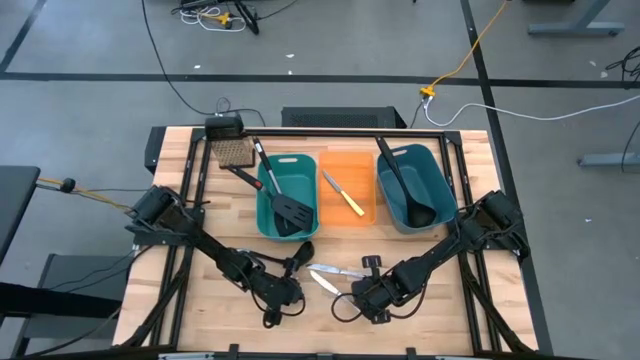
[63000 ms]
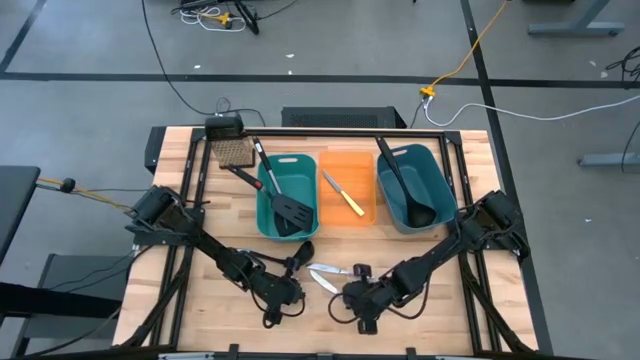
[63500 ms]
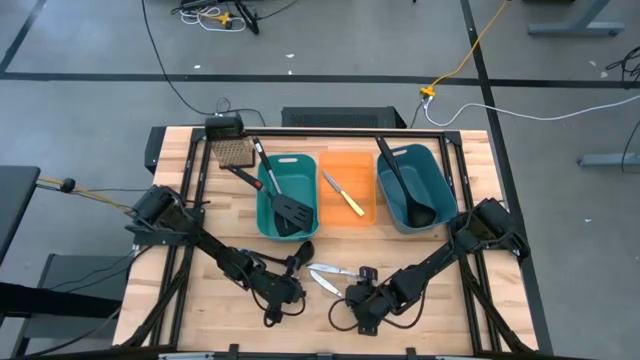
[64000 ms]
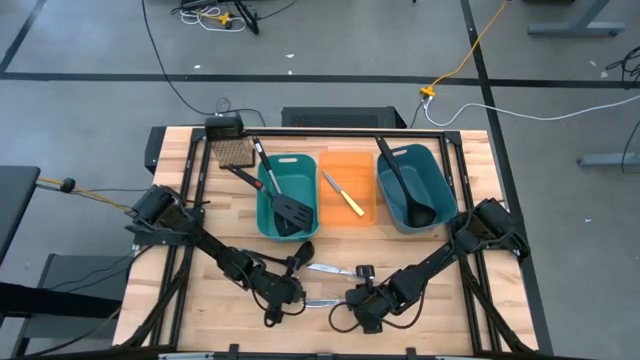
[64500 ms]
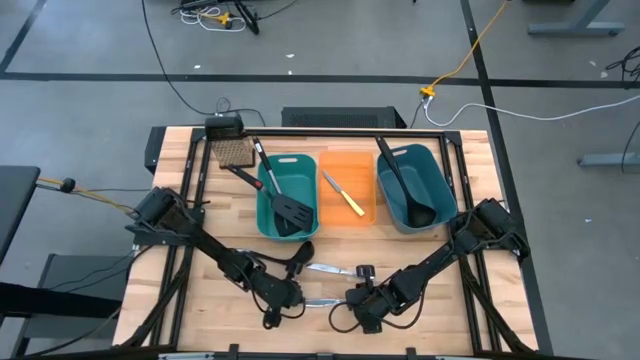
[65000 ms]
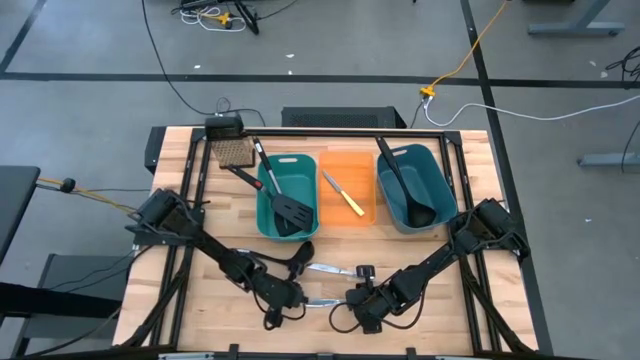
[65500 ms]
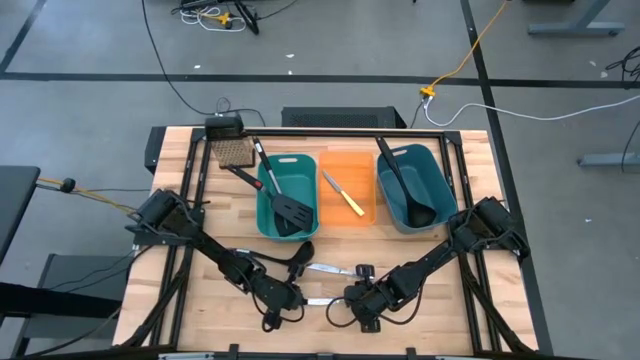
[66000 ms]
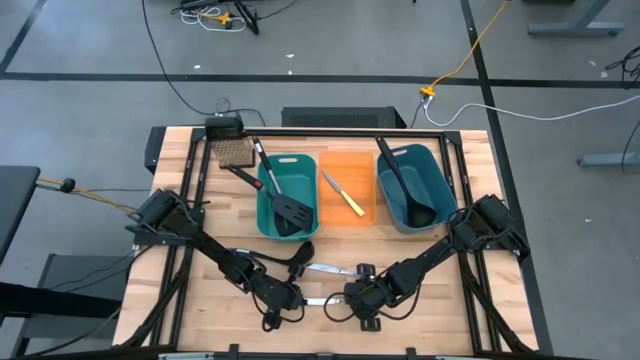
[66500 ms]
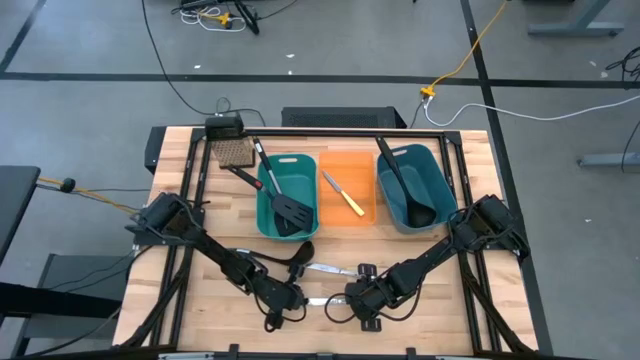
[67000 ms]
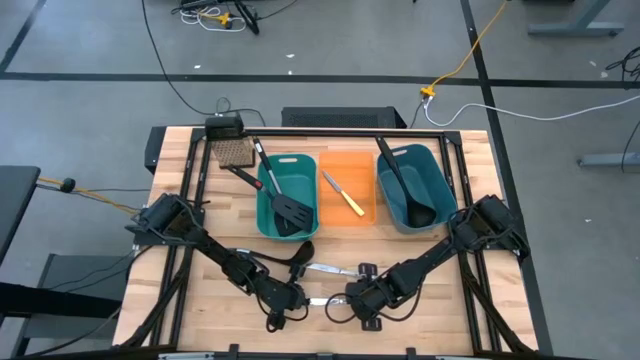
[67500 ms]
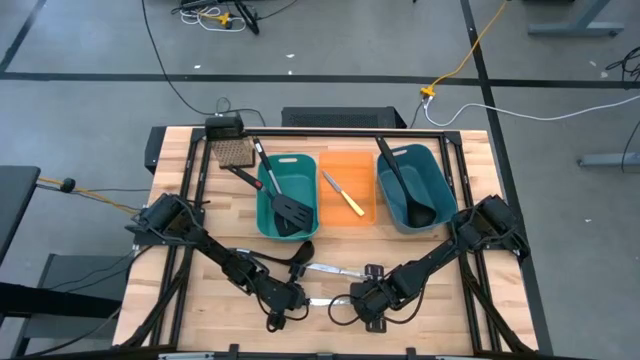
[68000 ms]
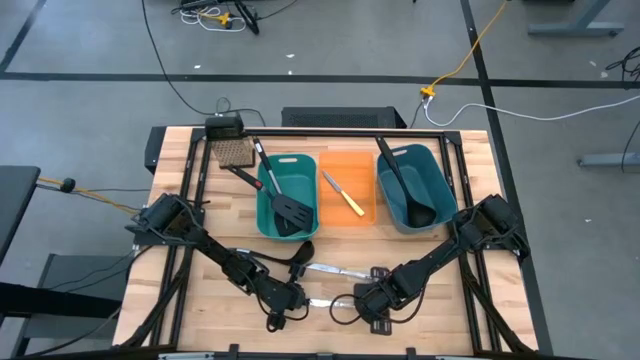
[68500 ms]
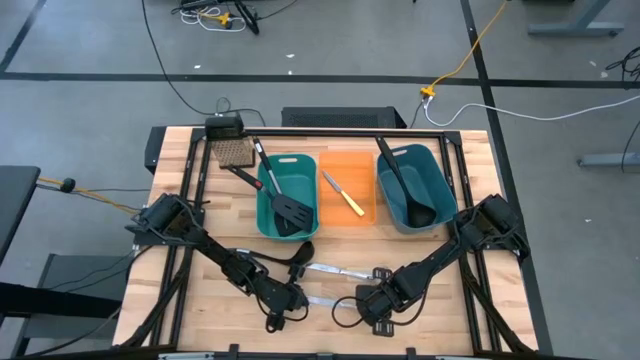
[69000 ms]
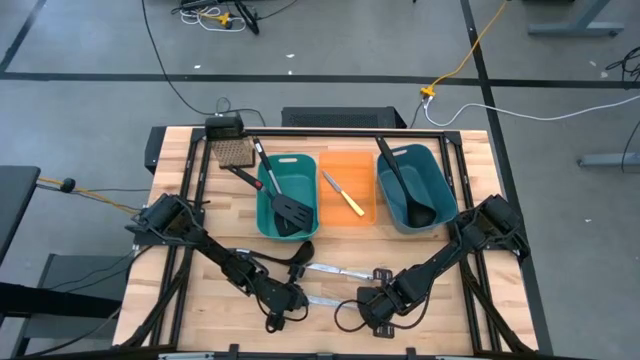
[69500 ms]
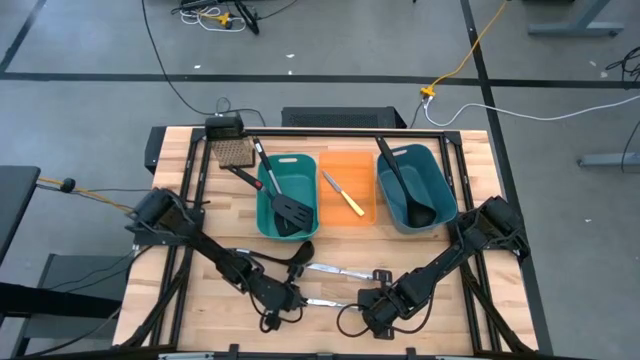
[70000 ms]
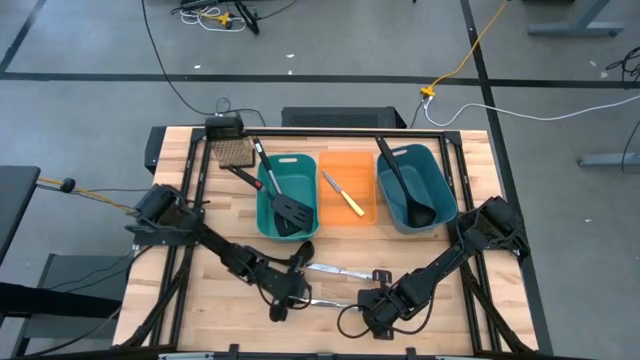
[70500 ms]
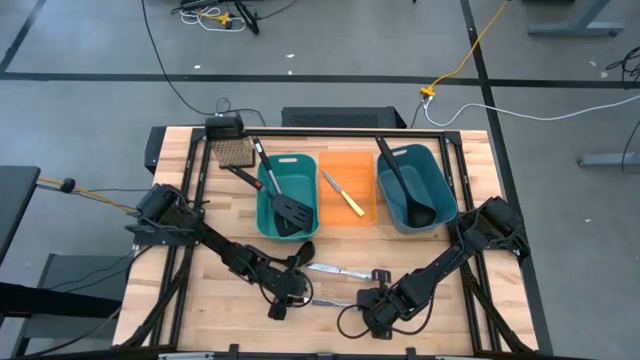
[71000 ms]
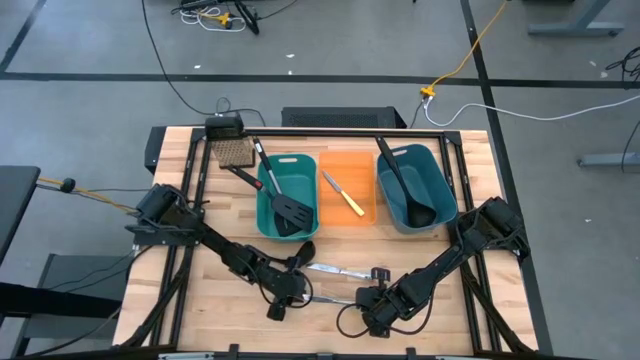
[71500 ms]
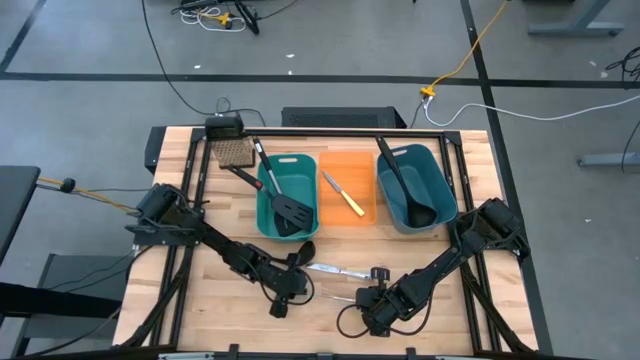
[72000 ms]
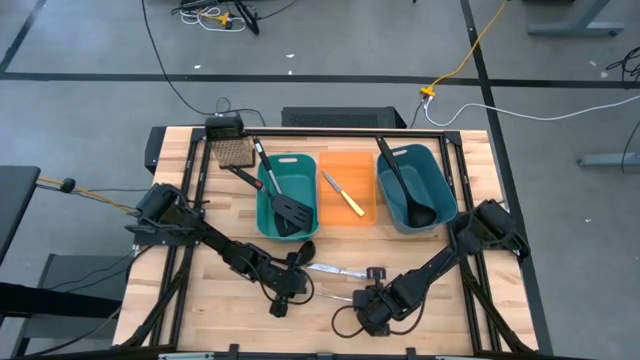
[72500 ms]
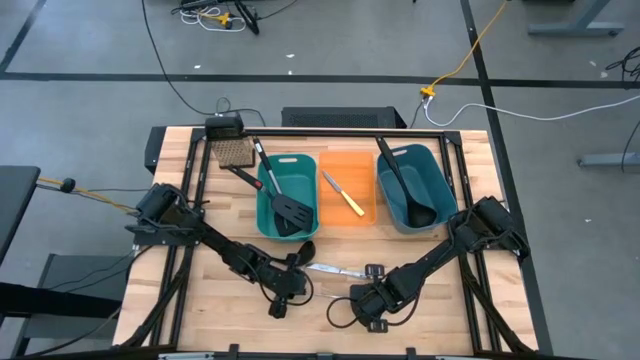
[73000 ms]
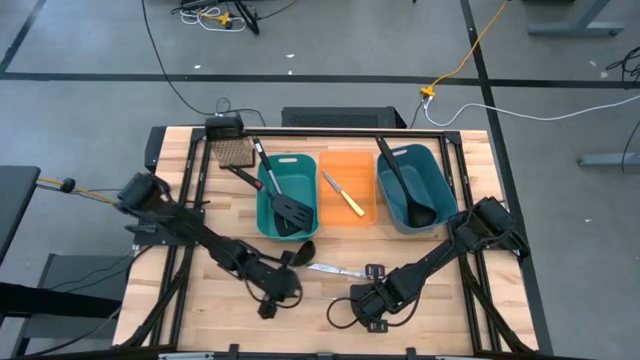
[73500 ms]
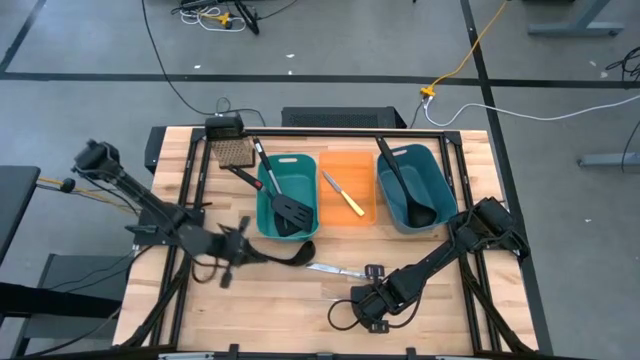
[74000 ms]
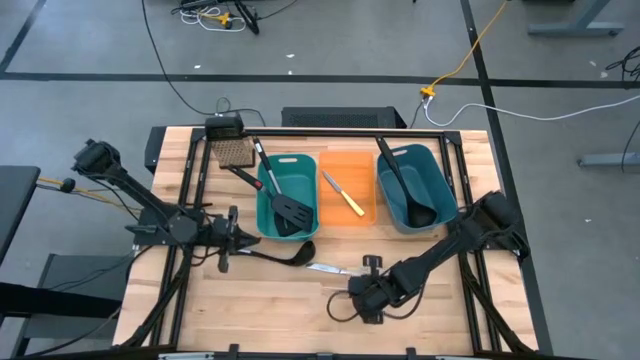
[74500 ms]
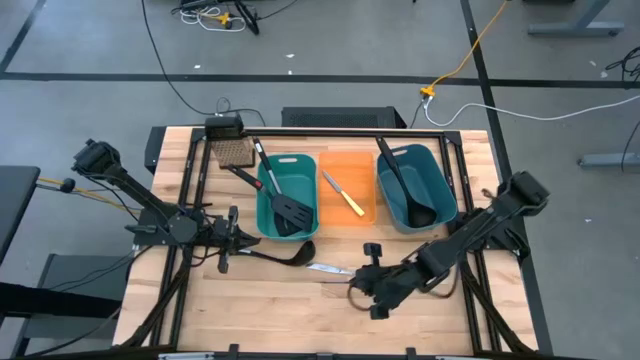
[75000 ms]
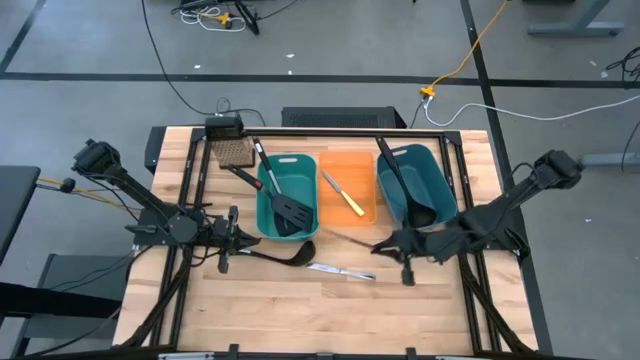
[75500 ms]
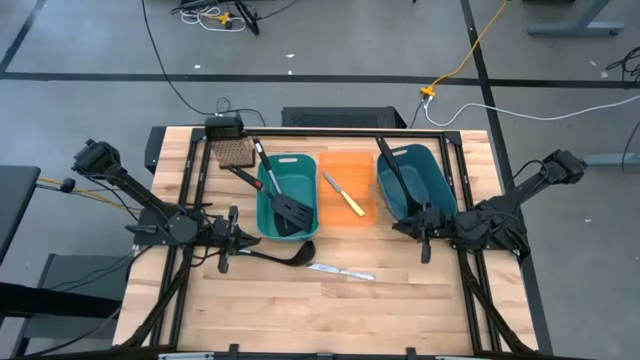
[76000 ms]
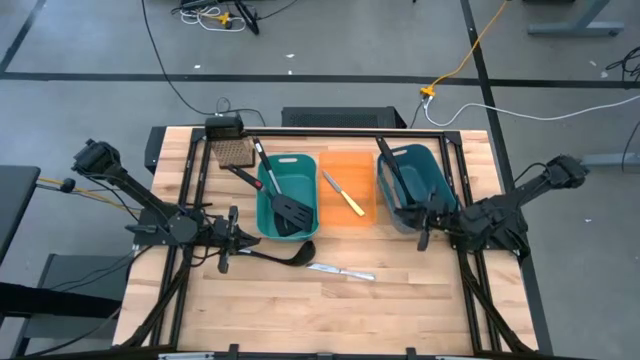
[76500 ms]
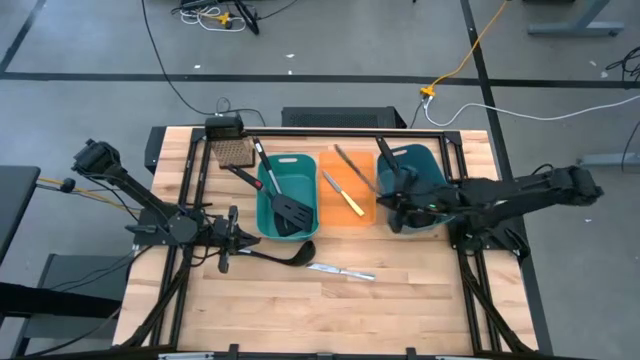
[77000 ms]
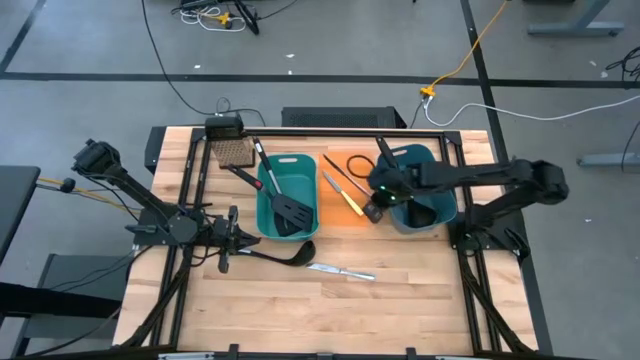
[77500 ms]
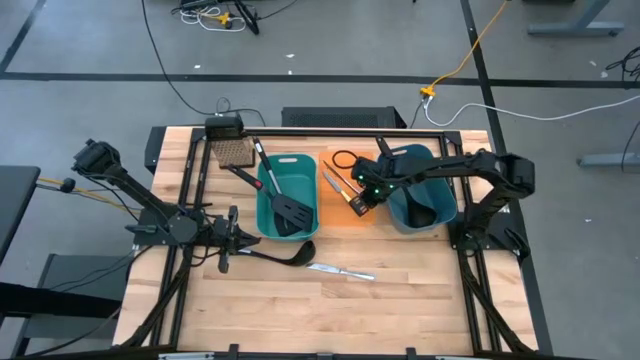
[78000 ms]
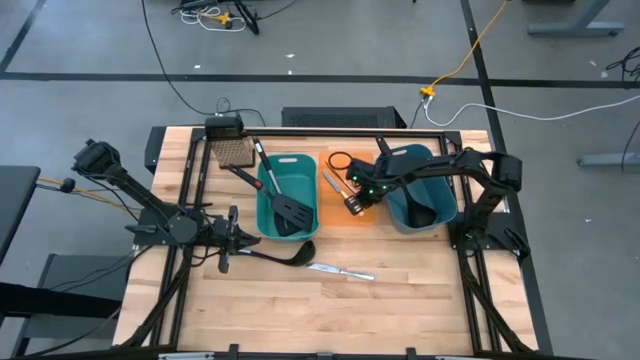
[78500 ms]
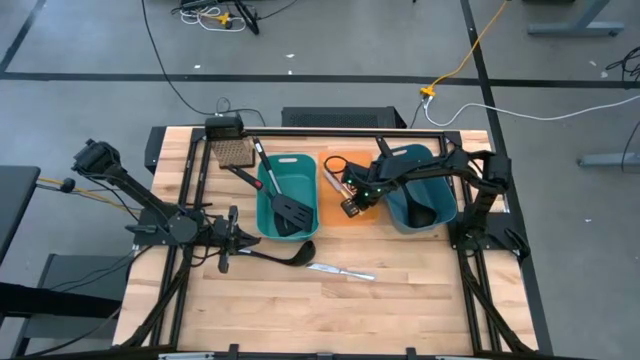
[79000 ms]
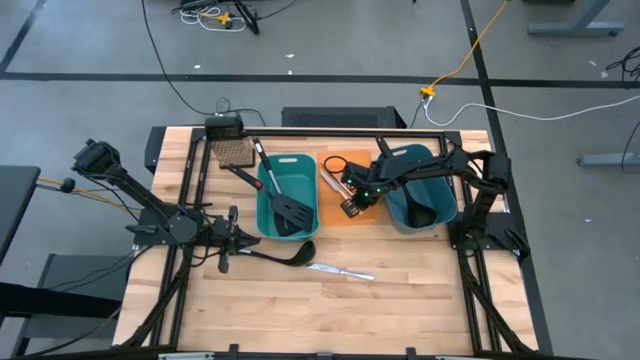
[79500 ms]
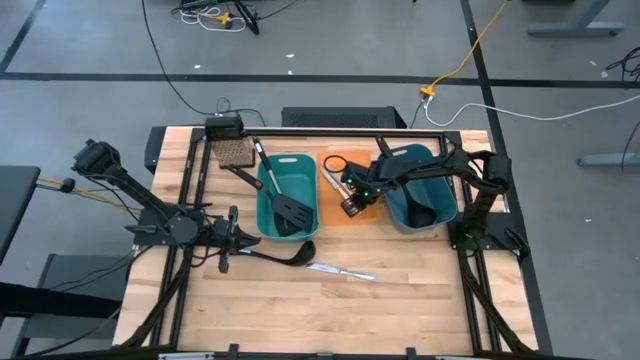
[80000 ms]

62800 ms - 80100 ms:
Task: Pick & Place Kitchen Items
Put the silver knife into the orange bin

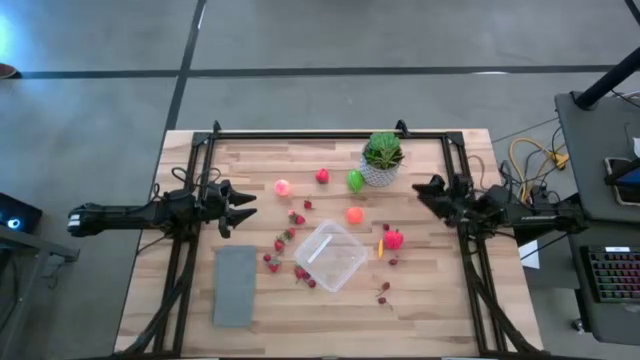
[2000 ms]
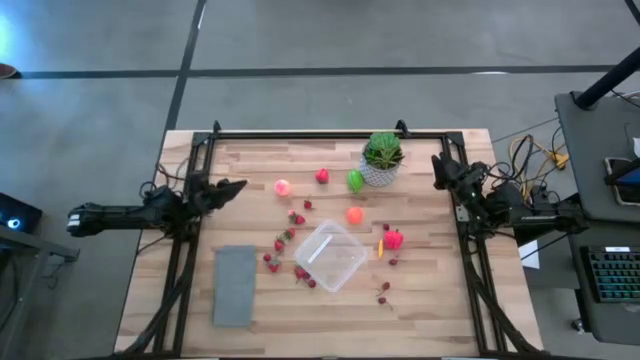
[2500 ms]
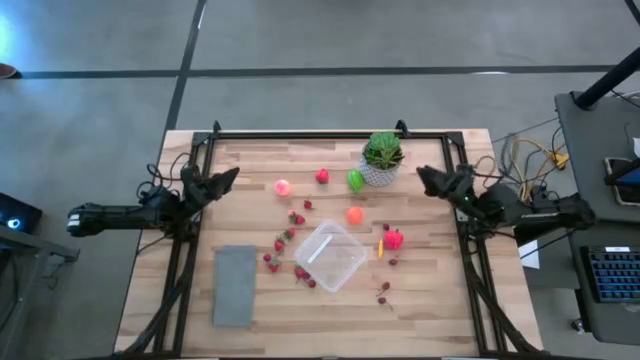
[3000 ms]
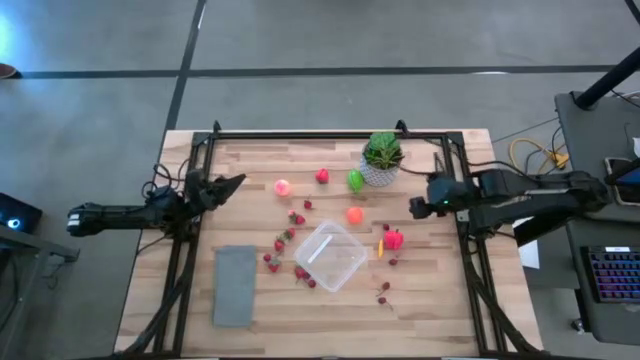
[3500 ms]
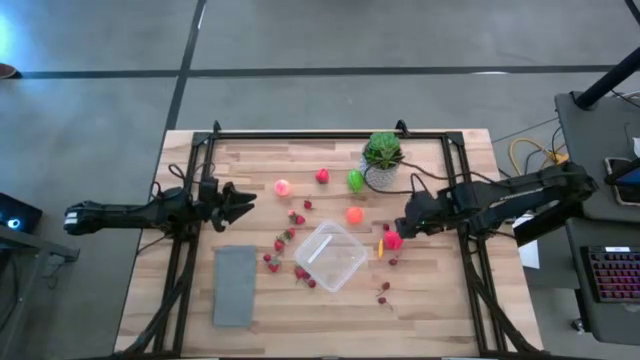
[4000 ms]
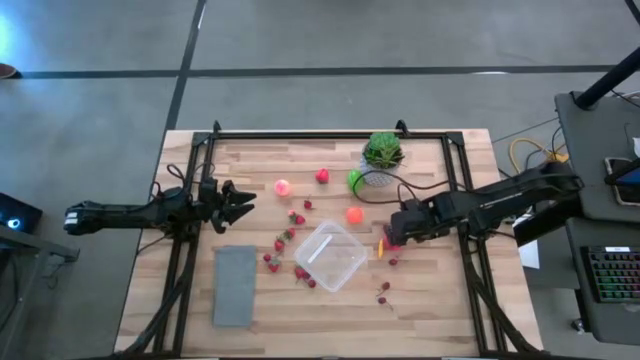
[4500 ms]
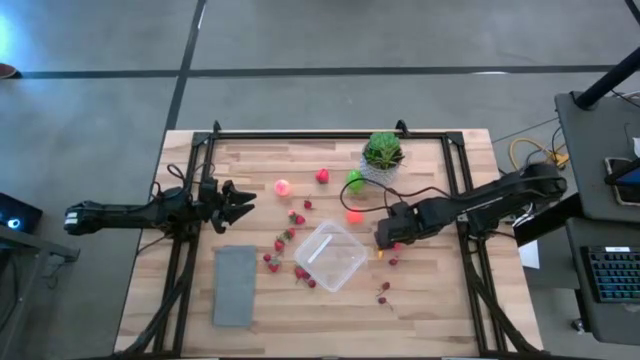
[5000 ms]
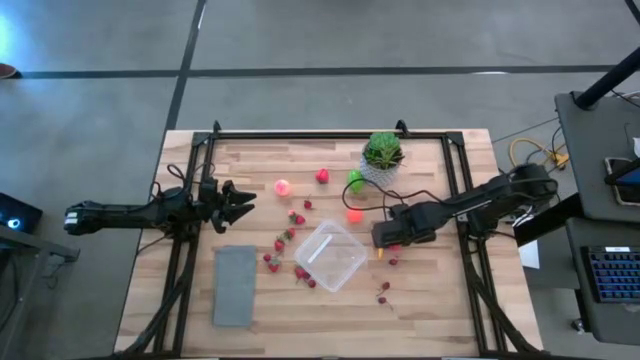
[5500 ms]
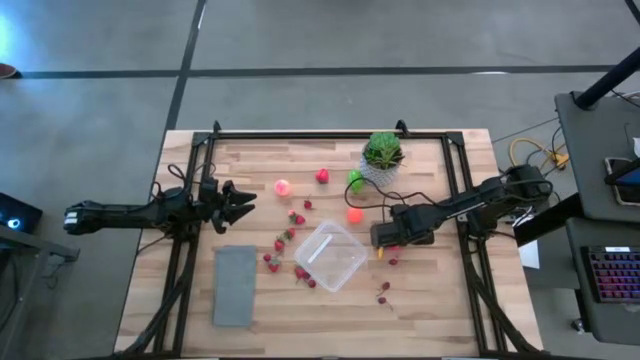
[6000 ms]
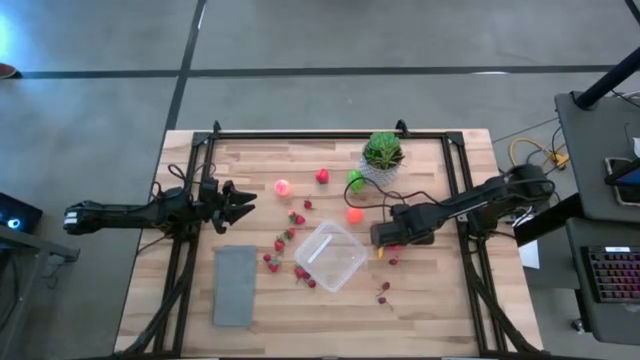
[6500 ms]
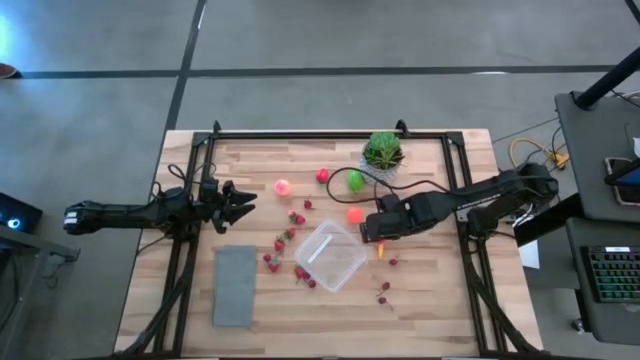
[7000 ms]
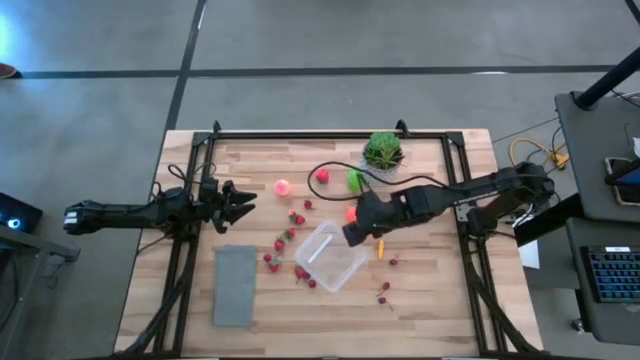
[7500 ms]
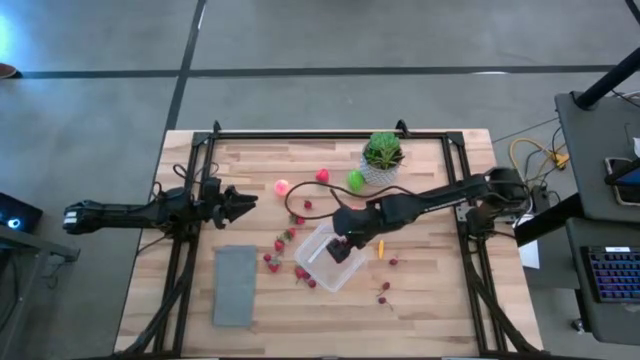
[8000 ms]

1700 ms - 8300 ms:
Task: Pick and placing Produce into tupperware
Put the red apple into the transparent bin
